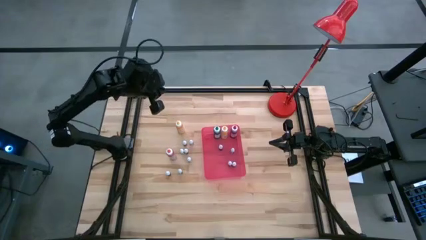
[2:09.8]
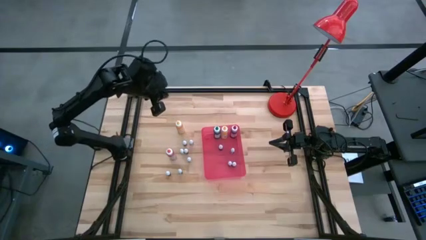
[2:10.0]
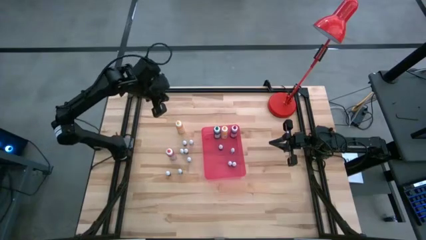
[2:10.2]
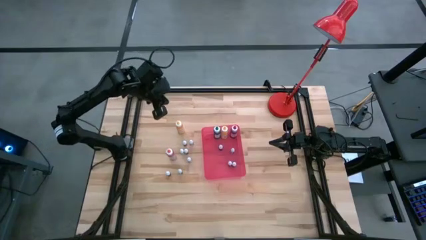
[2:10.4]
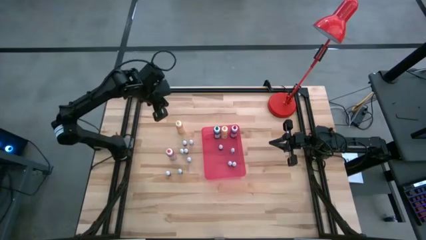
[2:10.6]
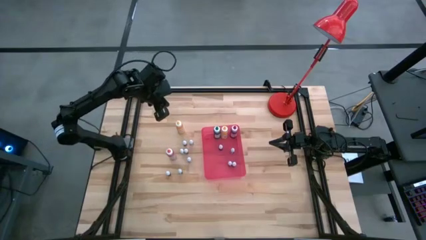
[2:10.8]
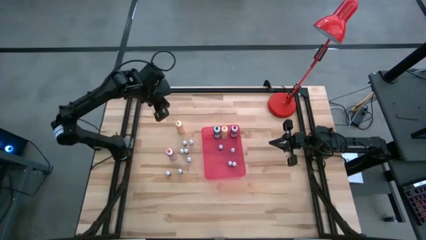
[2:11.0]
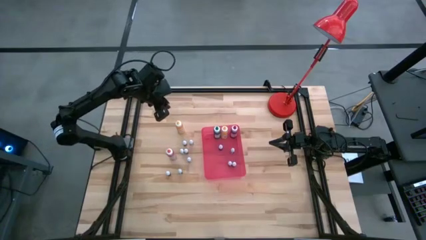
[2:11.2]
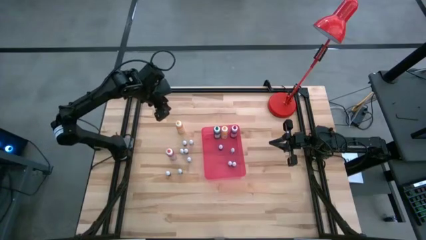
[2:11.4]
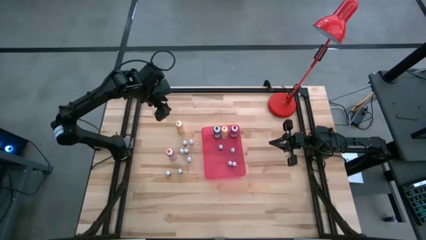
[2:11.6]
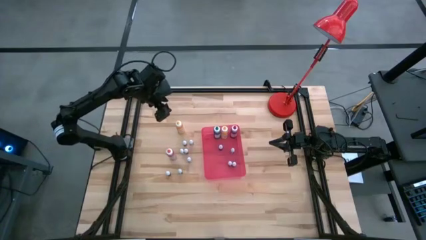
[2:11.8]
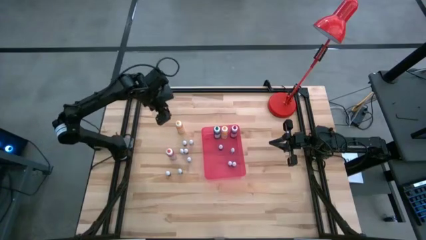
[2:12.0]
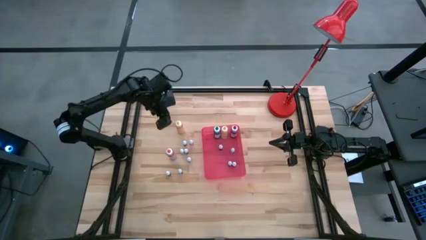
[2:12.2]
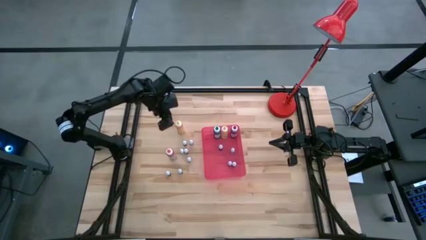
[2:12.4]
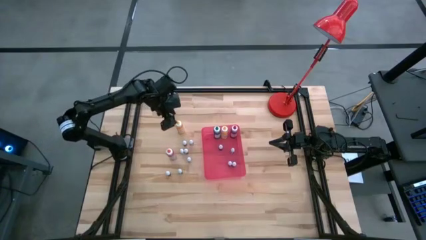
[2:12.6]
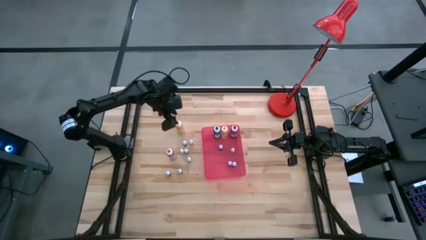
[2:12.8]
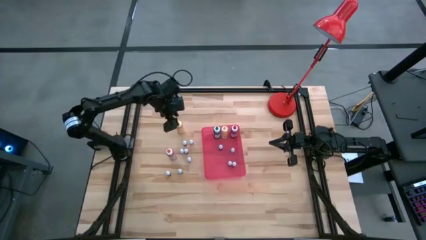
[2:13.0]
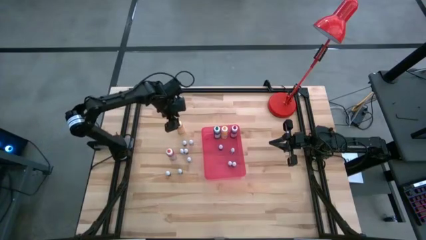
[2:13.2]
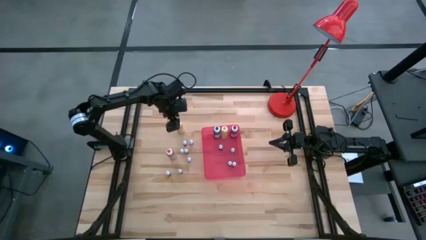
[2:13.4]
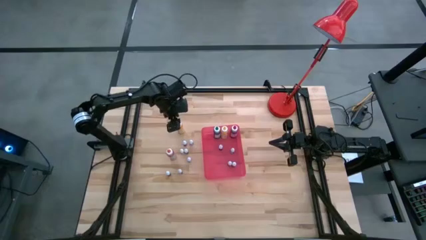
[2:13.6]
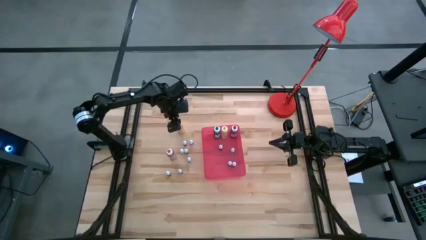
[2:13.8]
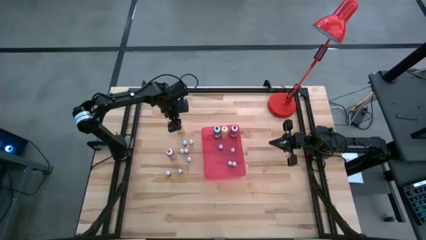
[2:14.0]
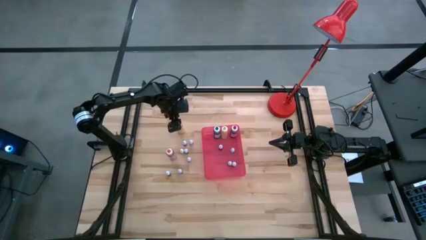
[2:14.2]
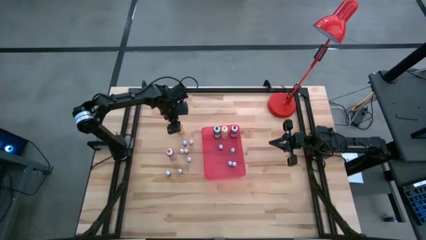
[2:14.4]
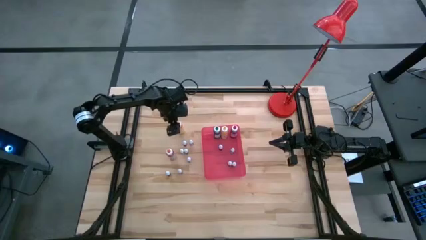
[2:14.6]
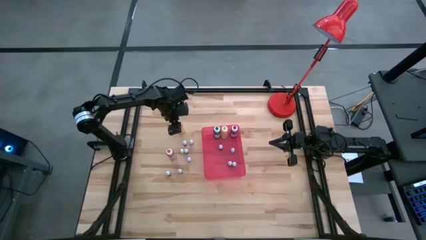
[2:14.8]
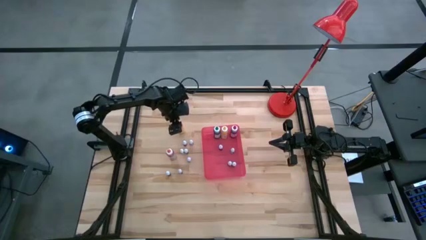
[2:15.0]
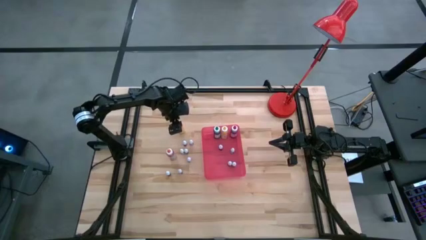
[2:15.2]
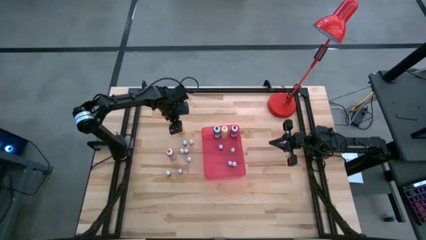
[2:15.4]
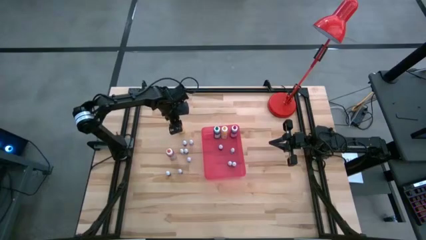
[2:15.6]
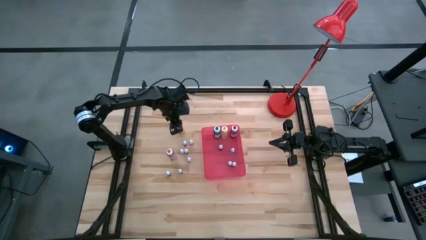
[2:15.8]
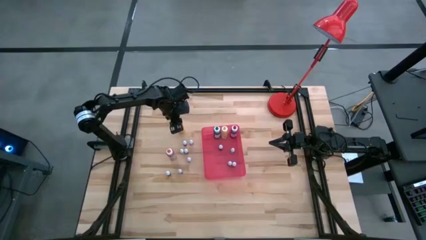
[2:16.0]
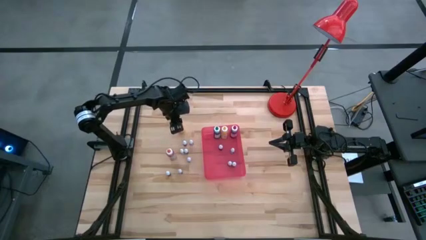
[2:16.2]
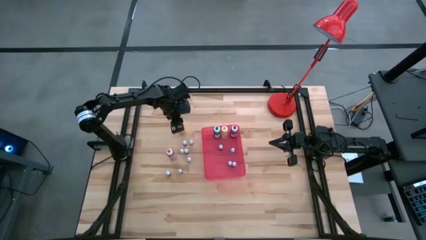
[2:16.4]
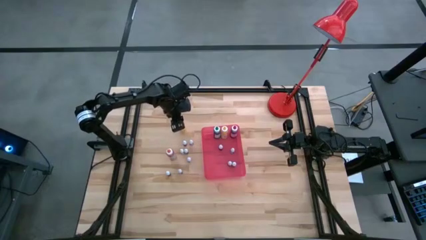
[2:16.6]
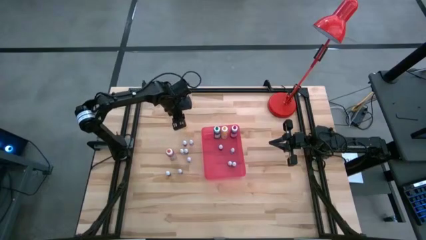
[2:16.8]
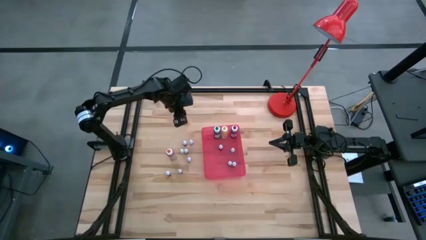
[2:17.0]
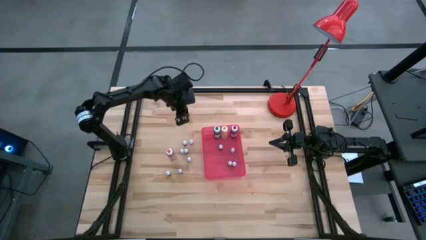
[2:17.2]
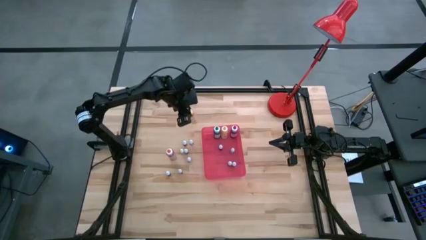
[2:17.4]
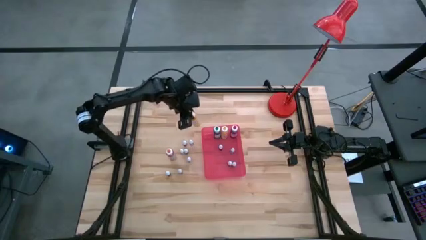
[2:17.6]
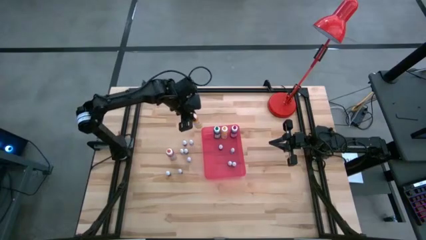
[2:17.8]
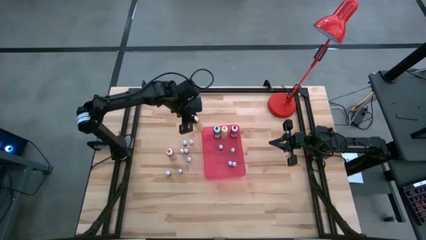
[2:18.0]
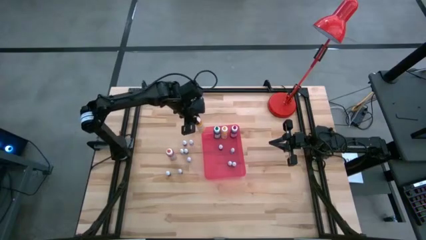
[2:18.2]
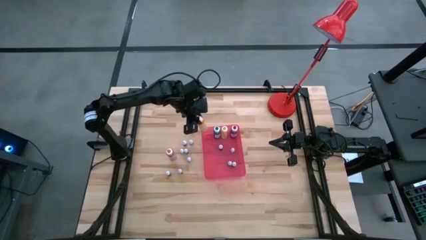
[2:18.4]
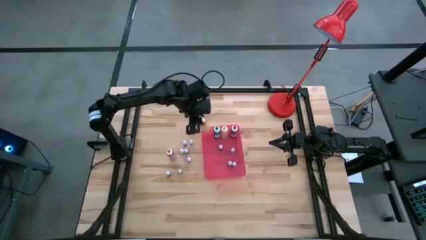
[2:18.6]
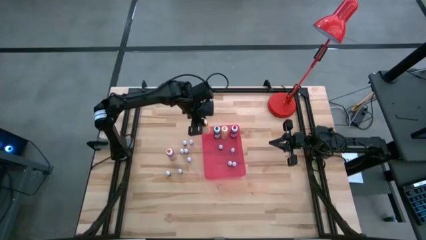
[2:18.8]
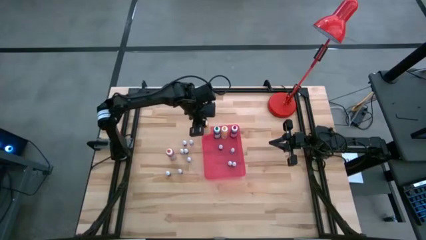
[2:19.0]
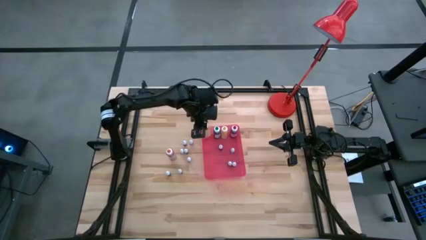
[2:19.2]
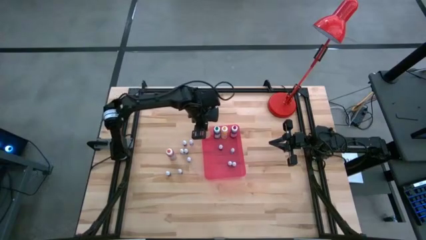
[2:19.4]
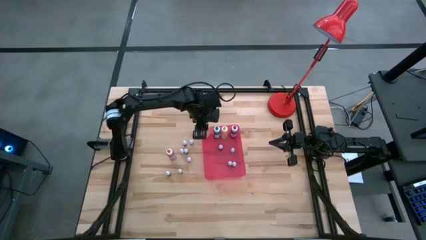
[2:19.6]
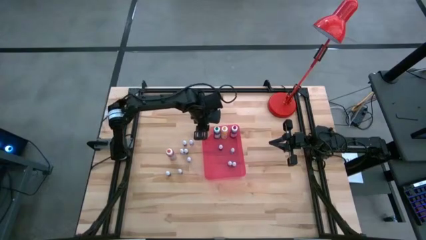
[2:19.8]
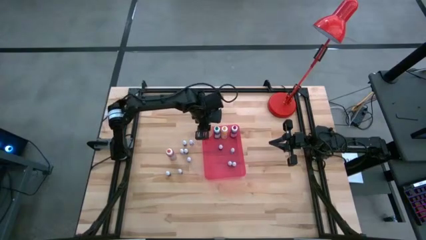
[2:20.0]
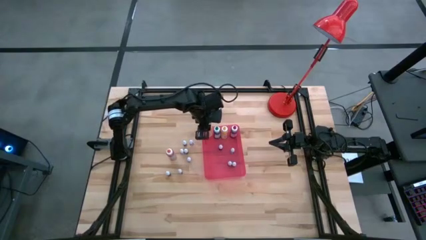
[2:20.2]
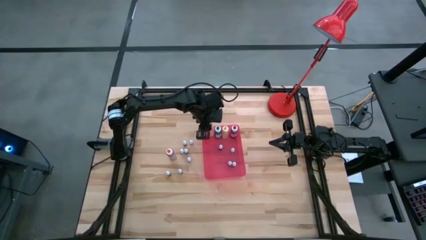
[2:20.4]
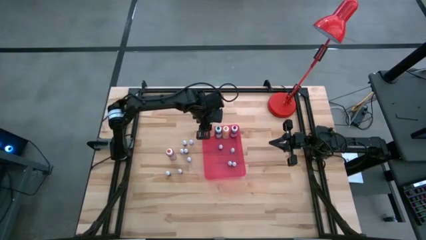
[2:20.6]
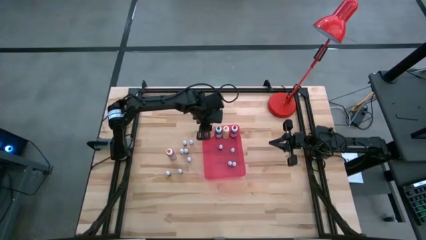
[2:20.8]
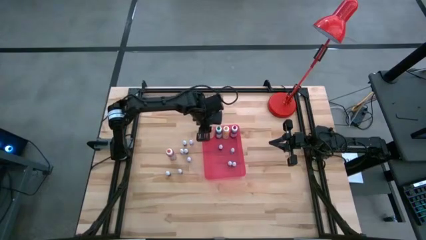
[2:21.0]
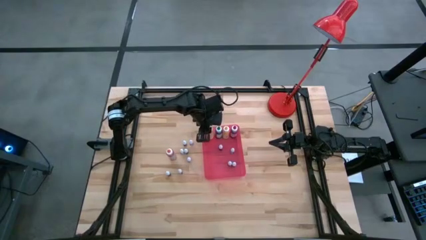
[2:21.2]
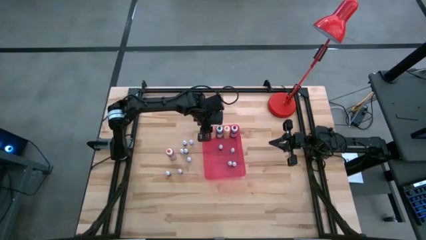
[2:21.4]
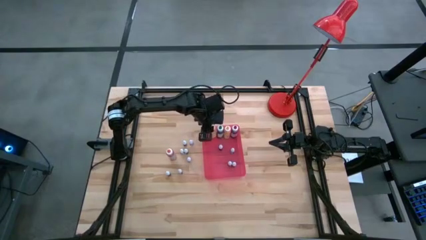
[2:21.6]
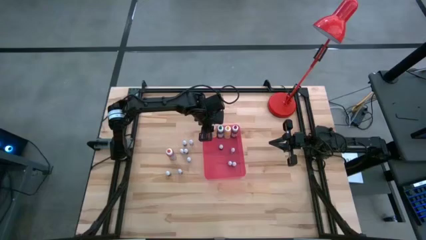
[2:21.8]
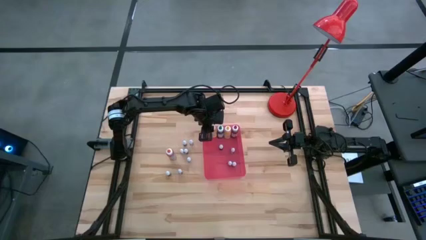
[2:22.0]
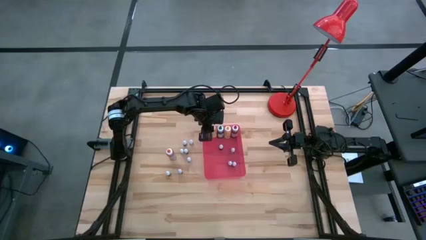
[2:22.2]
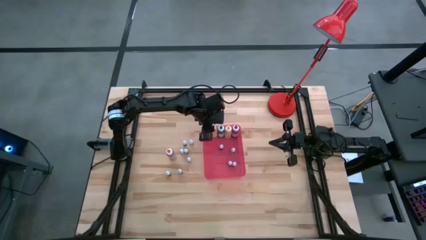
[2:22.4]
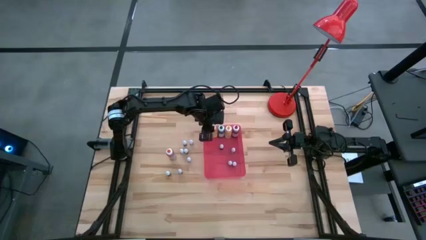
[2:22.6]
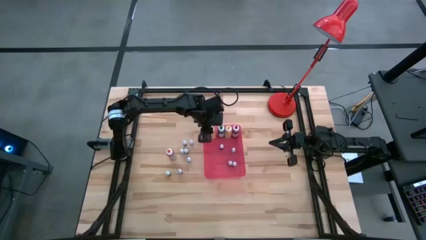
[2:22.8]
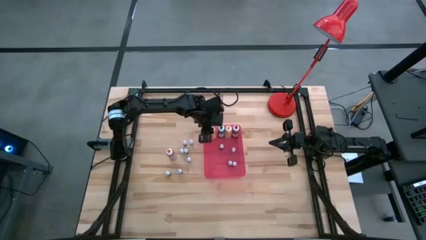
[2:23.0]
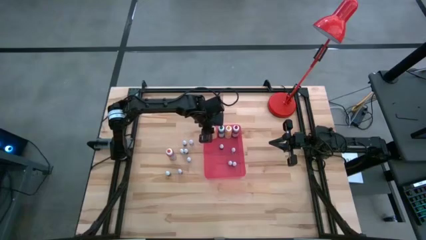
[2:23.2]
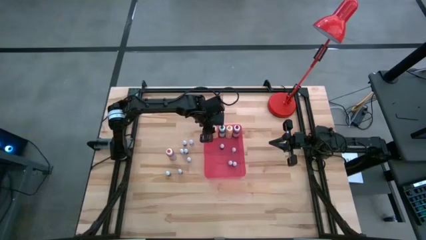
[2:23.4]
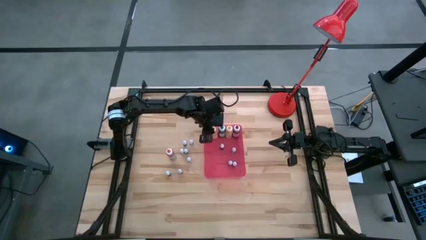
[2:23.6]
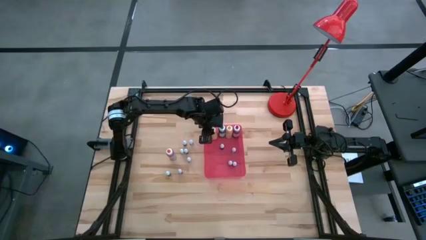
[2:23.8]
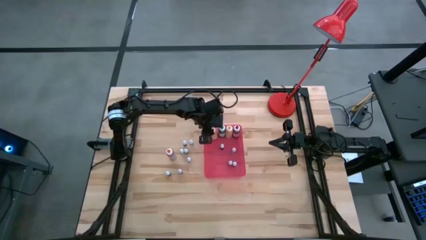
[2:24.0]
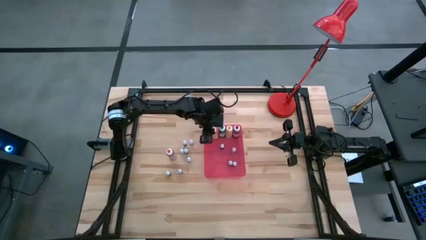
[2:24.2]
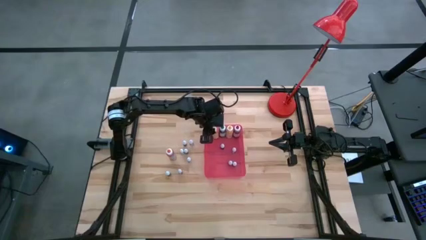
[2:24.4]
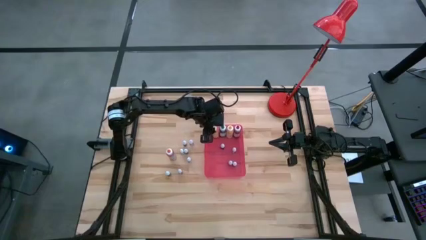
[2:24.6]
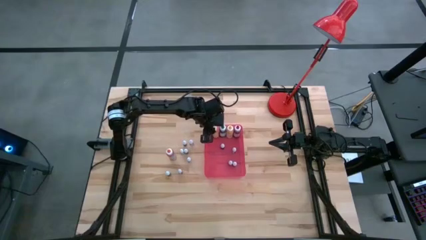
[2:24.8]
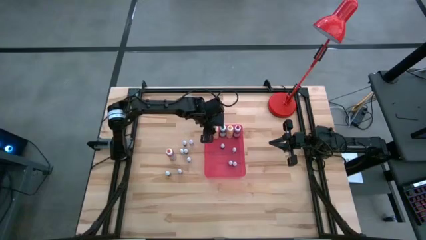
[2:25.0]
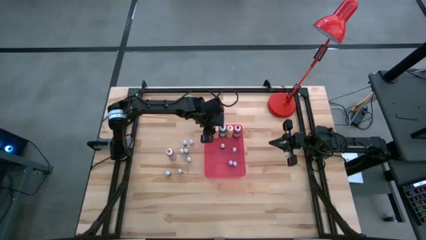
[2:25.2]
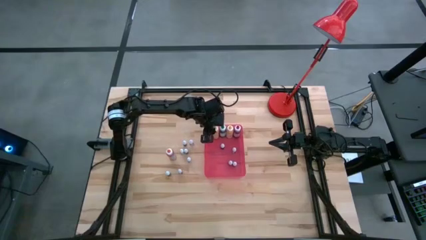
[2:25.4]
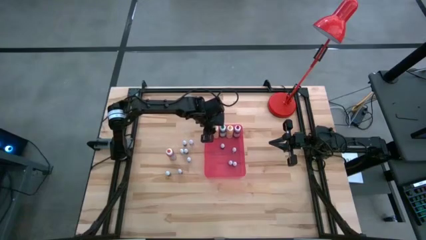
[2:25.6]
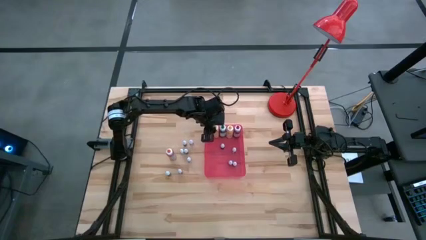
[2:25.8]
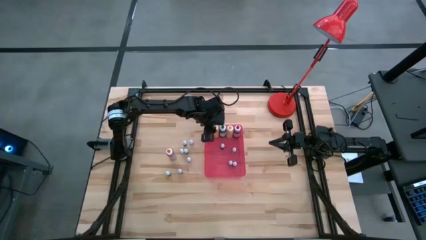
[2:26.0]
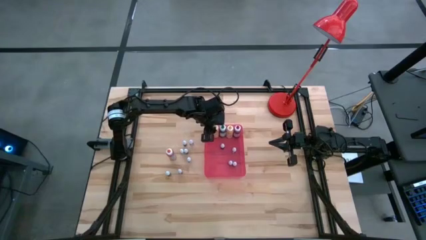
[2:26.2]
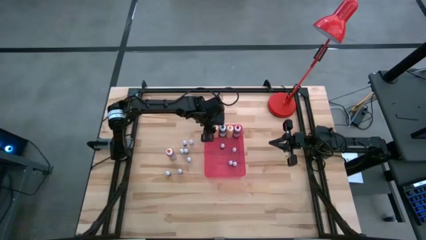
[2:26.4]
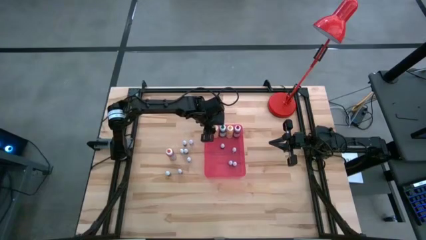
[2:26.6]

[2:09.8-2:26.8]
Task: Pick & Place food coloring
Put the large yellow food coloring bottle into the red bin

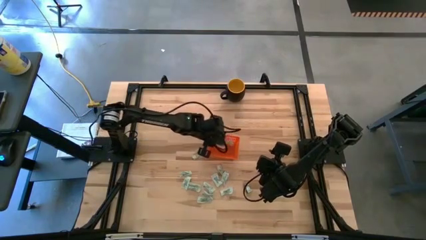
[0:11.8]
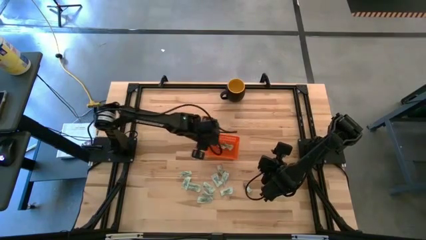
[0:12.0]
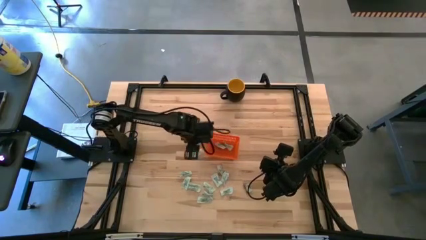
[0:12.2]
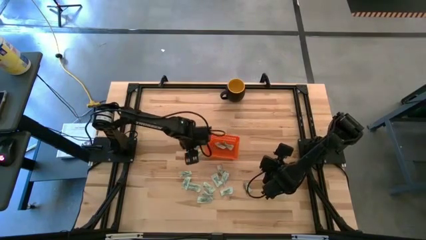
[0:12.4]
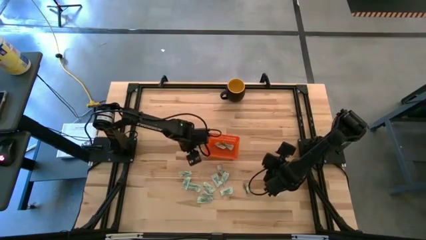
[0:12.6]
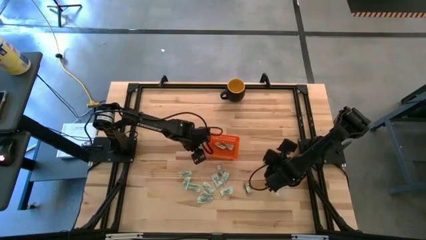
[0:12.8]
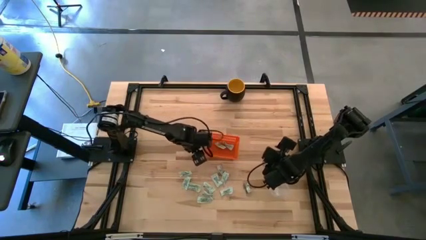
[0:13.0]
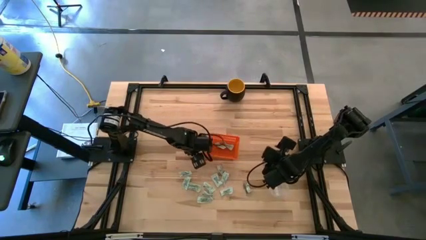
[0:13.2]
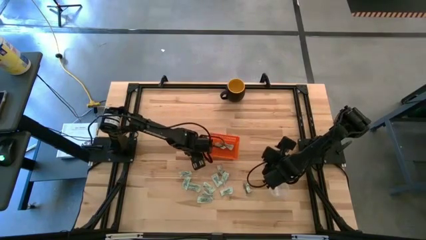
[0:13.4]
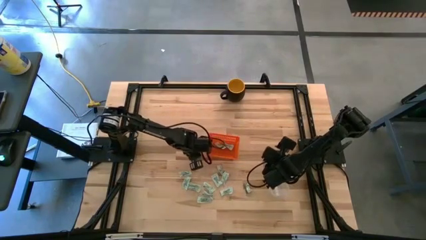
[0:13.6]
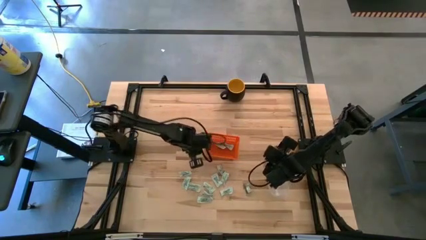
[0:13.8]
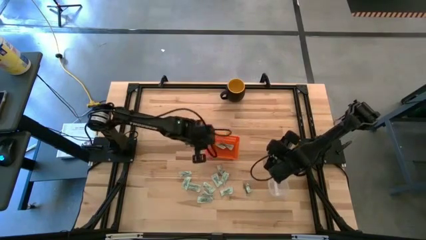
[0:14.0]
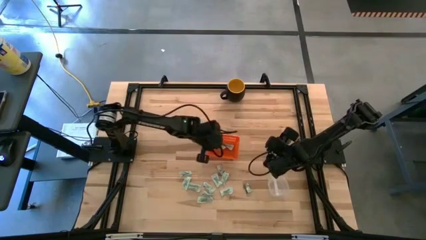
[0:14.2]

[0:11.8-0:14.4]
Task: Pick and place items into bin
Put the light green stevia packet into the orange bin
